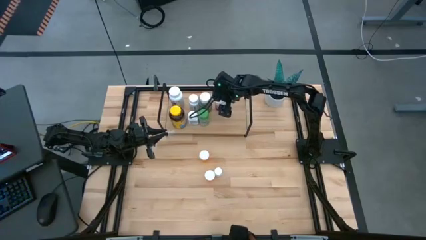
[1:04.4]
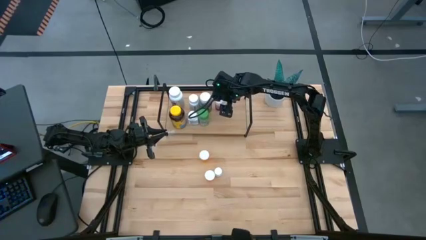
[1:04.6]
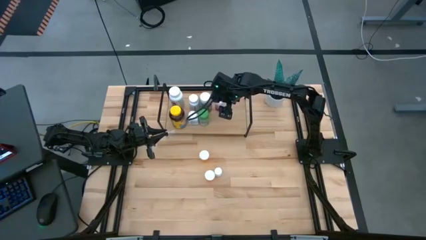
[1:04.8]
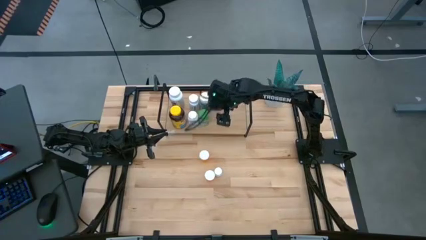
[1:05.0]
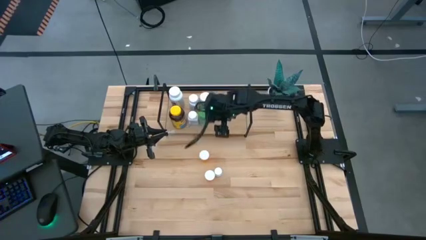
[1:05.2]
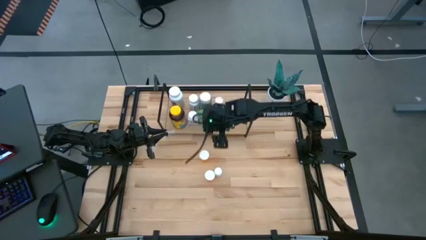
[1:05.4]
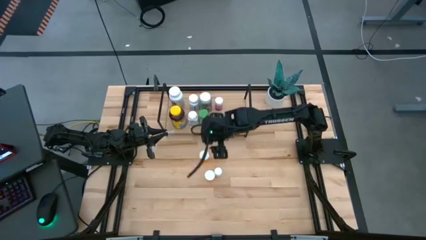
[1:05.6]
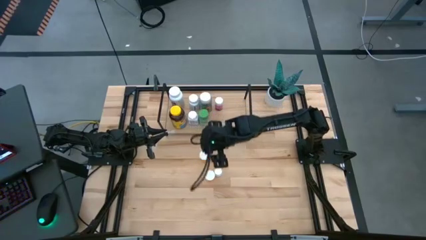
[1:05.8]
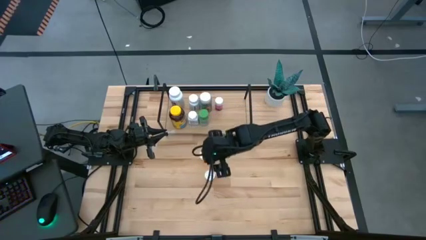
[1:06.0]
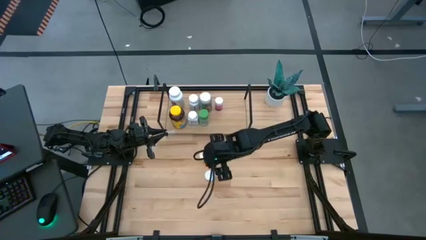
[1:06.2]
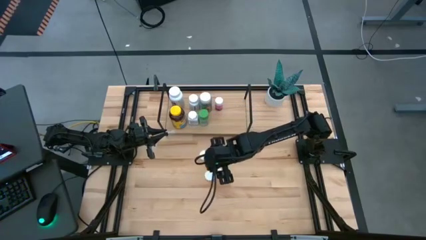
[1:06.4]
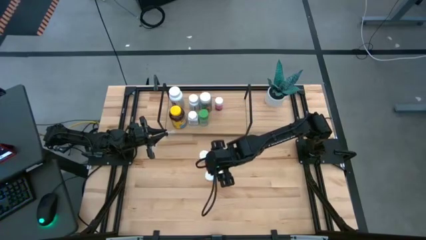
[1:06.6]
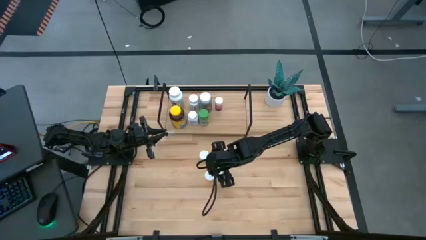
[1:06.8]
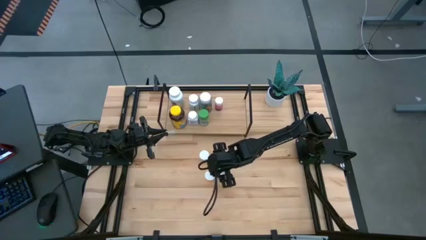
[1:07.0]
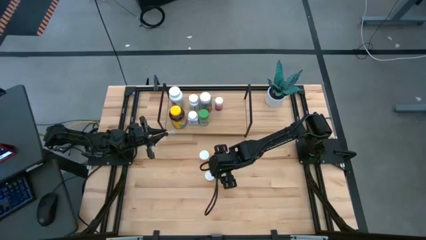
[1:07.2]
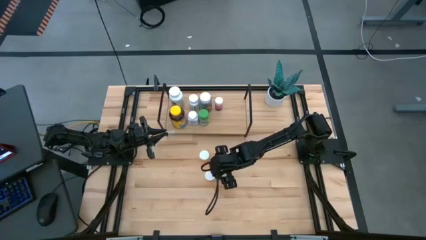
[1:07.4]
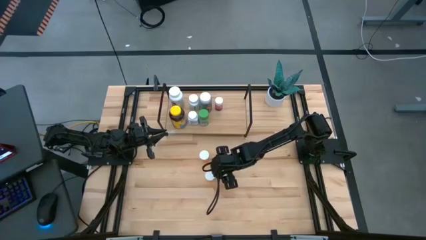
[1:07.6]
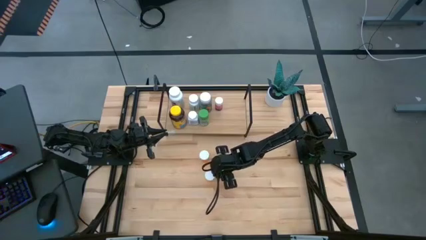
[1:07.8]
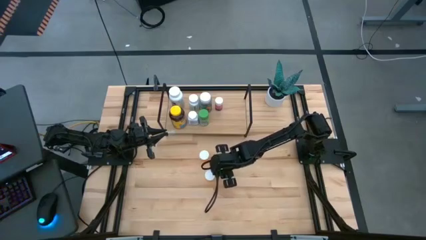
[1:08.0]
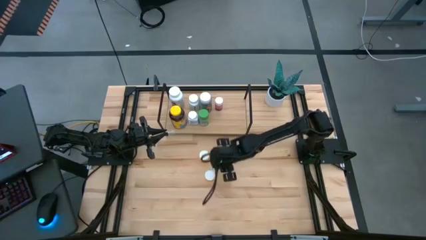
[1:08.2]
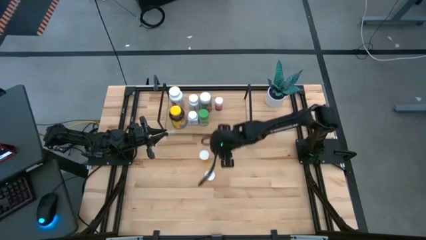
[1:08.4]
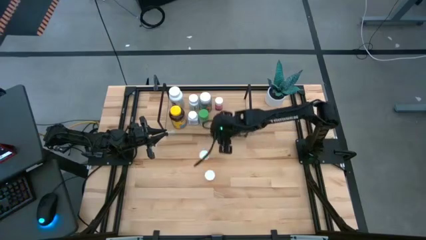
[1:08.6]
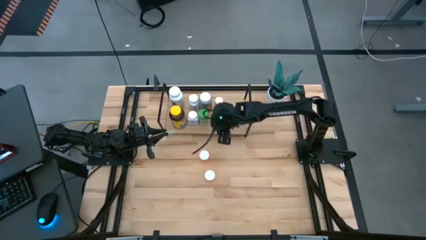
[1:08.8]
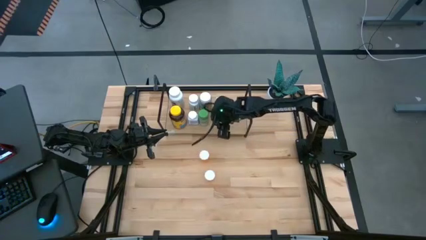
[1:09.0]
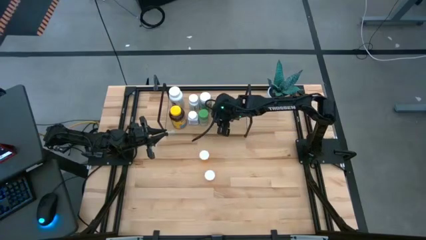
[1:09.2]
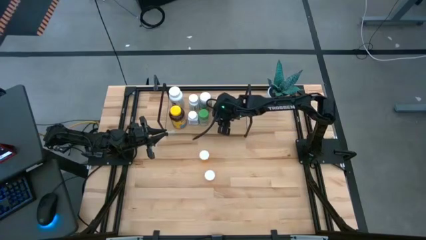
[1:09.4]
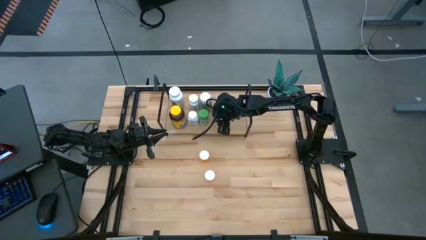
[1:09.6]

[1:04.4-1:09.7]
Task: Pick and place medicine bottles onto shelf by color
Put the white pill bottle on the shelf

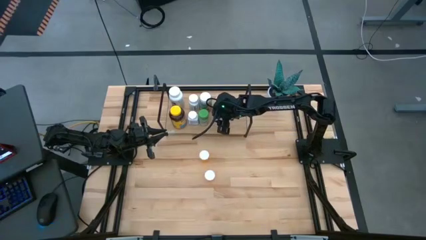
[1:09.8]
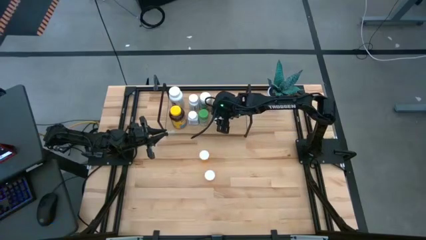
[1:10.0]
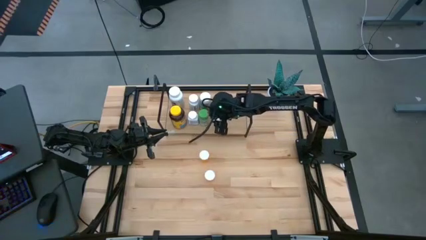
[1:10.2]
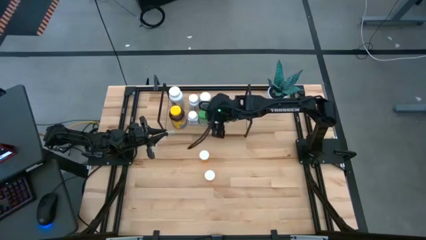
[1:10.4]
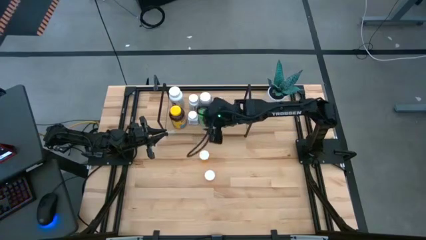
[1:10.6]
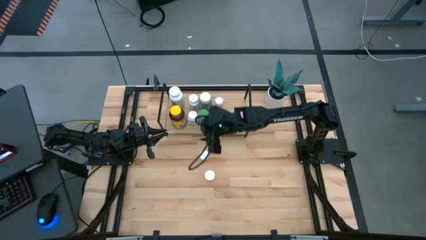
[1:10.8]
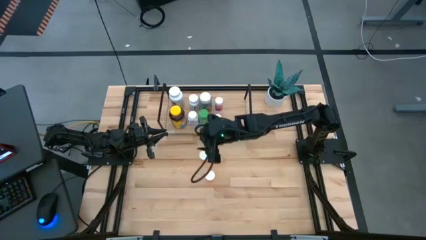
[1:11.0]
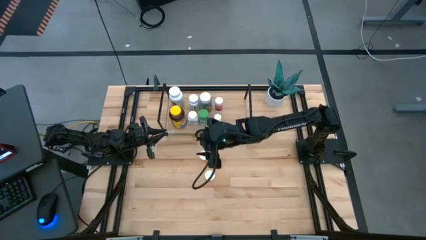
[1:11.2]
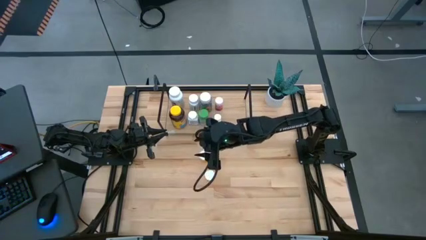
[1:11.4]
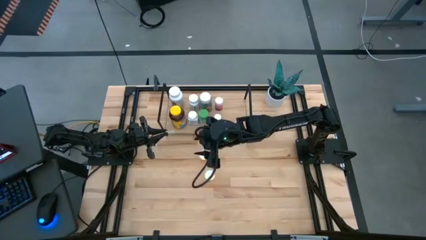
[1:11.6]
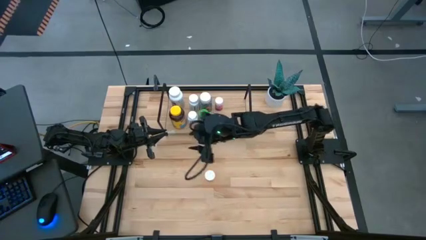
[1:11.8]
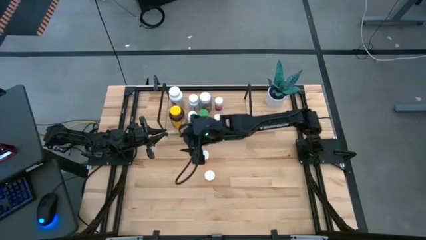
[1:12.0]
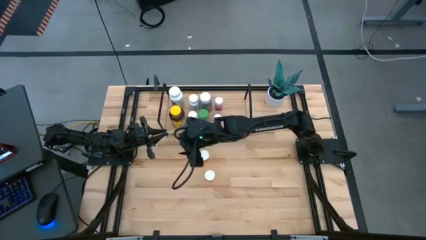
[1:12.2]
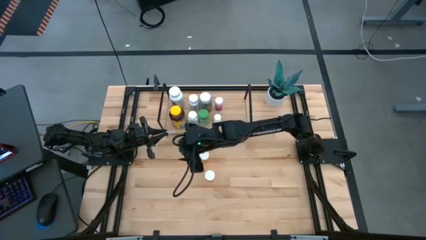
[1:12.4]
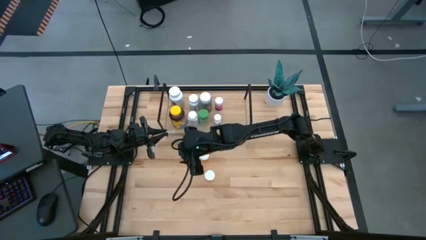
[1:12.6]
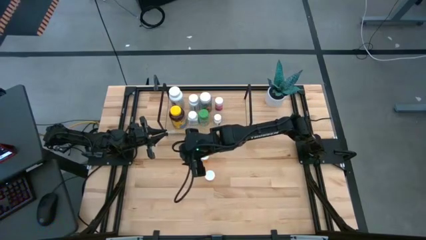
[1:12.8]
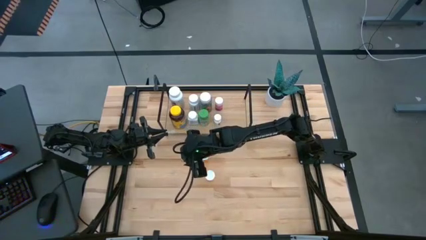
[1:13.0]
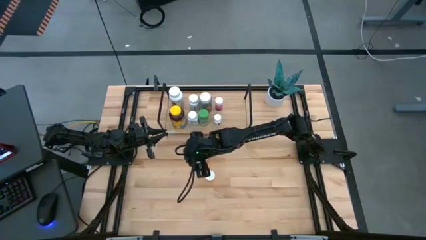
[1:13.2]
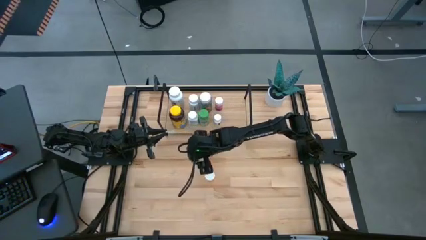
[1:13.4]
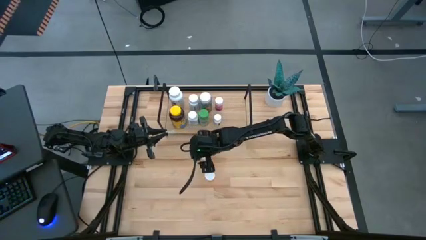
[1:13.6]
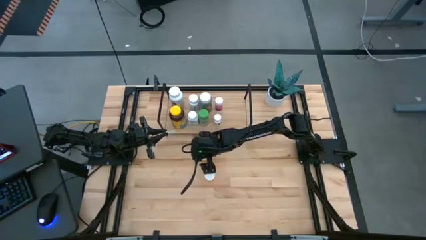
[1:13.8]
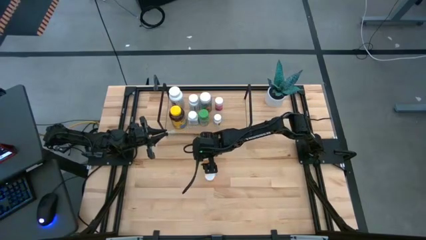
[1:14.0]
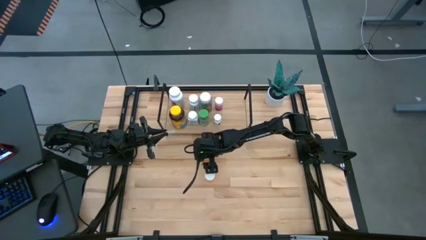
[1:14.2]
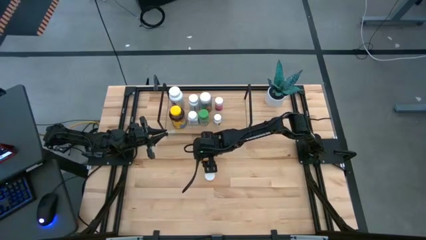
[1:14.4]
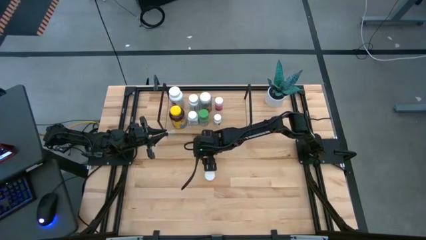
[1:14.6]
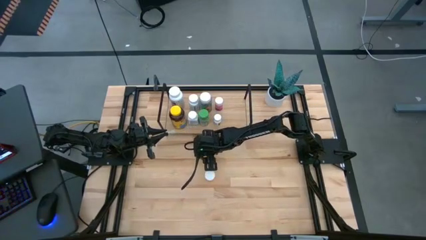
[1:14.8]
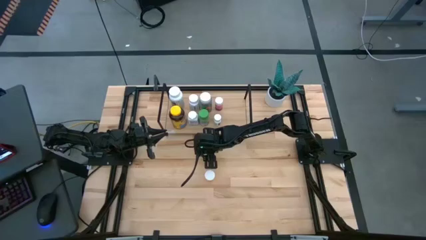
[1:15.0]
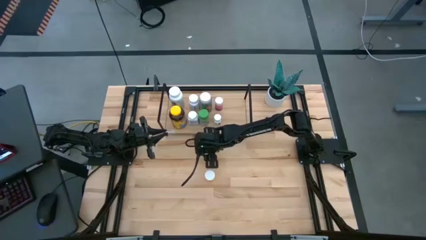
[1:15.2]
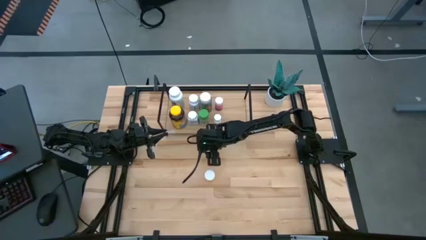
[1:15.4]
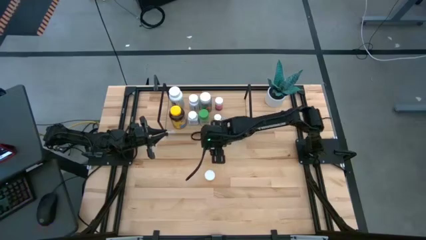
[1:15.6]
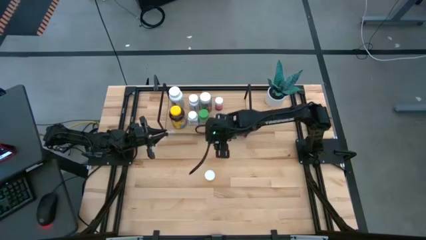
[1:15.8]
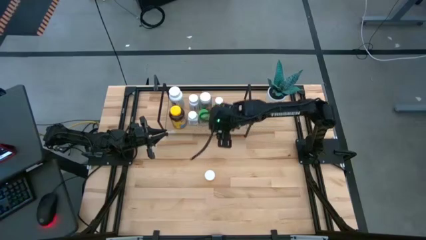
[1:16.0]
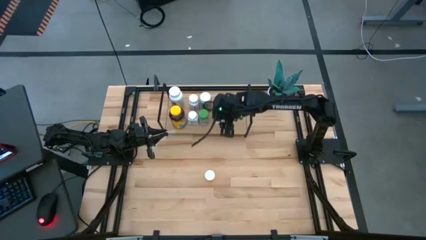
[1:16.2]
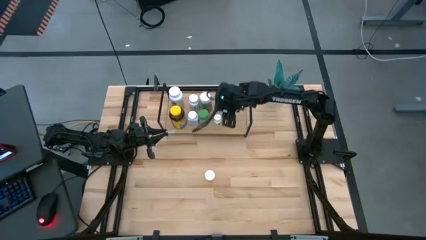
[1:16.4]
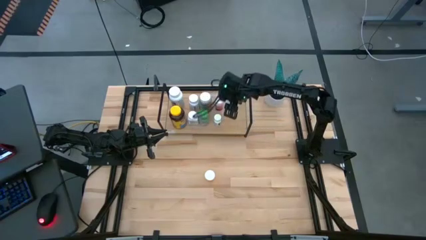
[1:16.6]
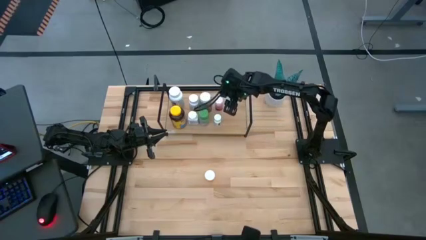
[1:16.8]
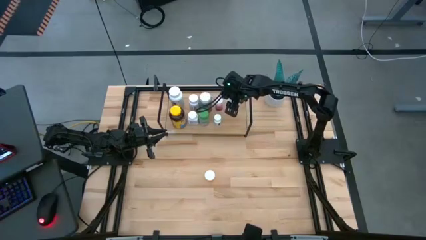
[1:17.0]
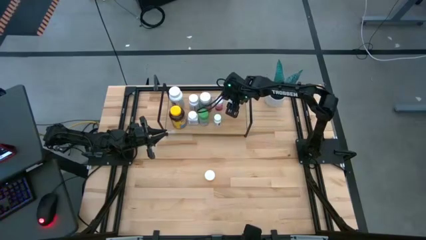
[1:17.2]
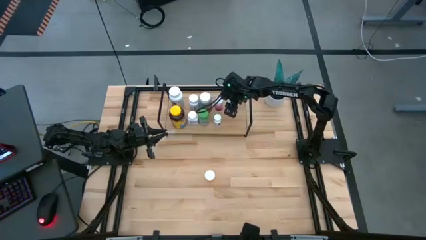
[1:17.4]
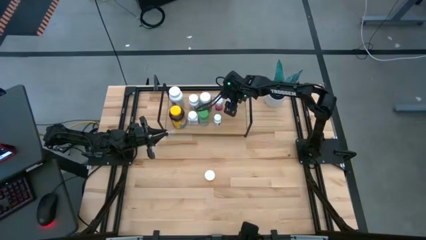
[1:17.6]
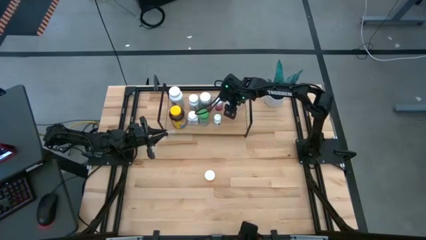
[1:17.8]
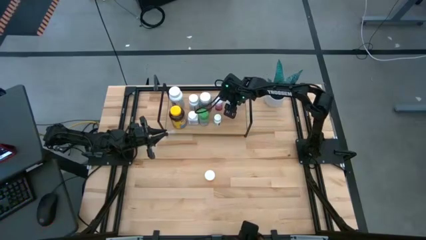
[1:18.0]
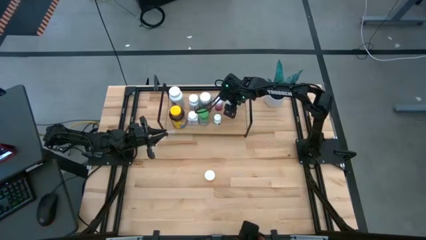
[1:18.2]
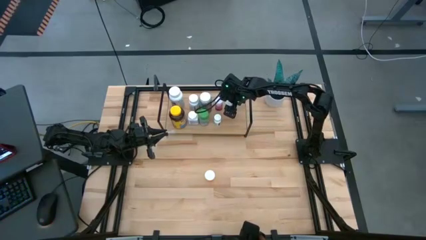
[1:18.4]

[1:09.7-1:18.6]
Put the top orange pill bottle on the shelf

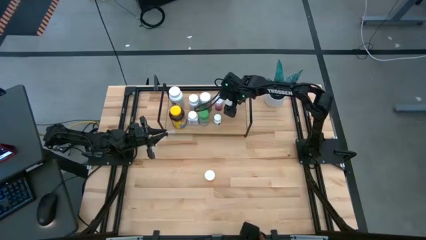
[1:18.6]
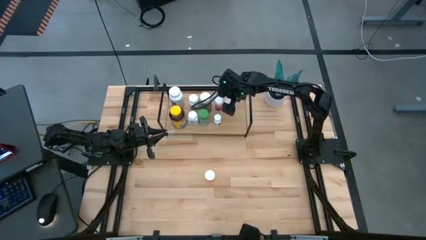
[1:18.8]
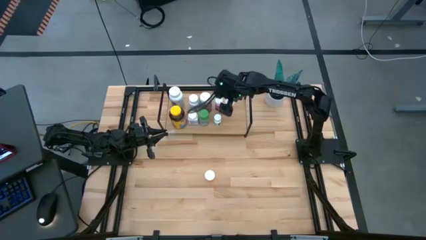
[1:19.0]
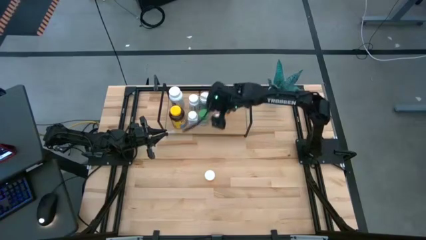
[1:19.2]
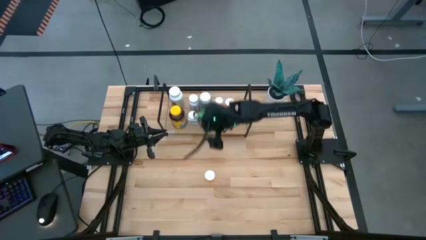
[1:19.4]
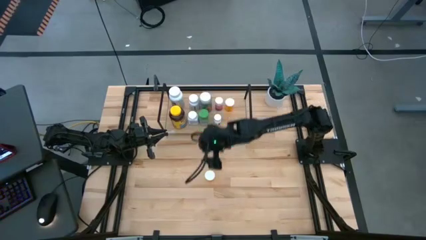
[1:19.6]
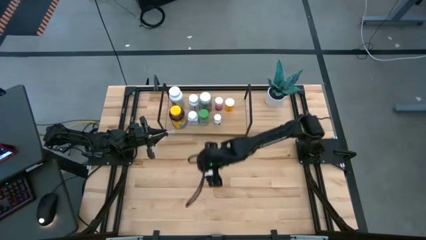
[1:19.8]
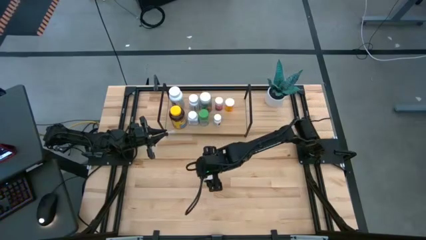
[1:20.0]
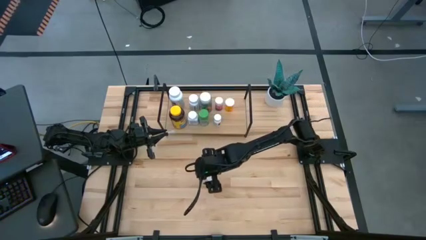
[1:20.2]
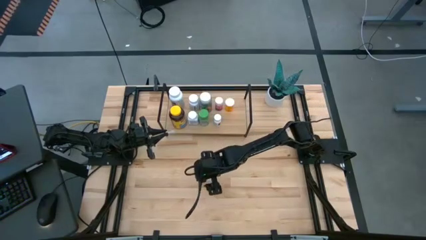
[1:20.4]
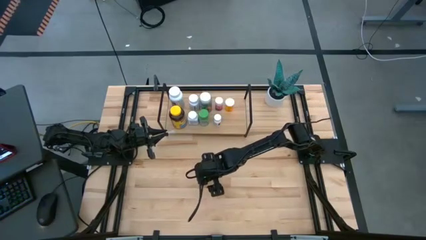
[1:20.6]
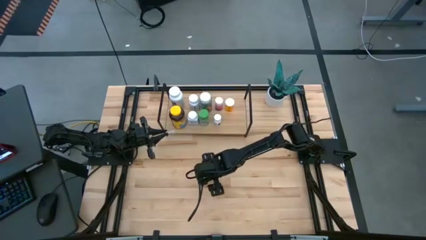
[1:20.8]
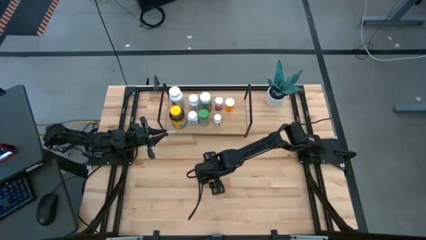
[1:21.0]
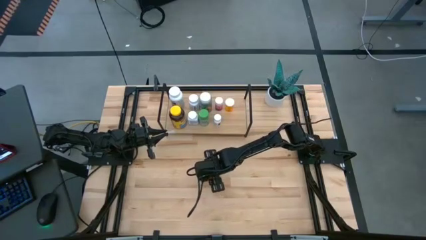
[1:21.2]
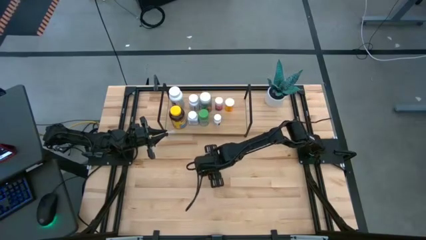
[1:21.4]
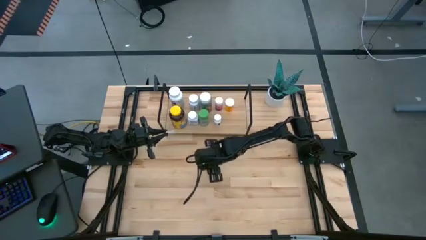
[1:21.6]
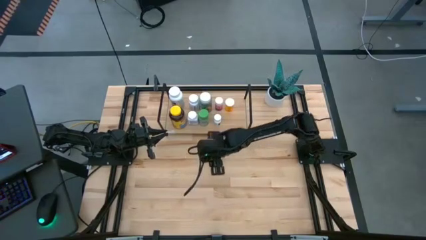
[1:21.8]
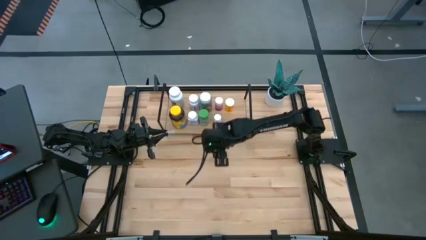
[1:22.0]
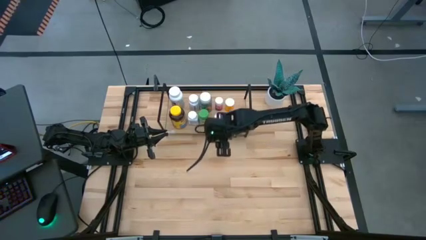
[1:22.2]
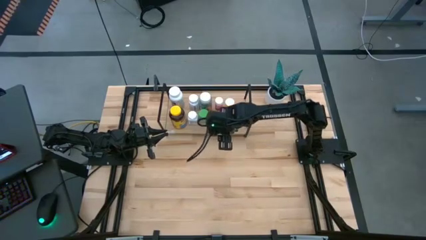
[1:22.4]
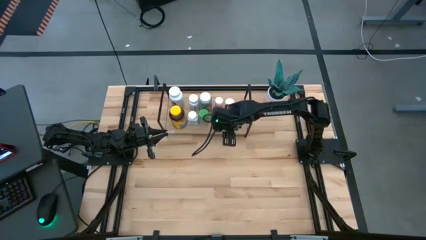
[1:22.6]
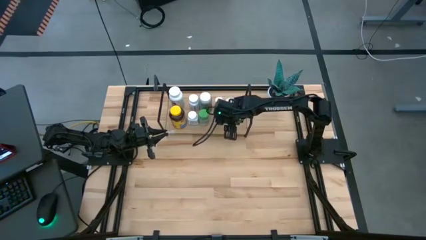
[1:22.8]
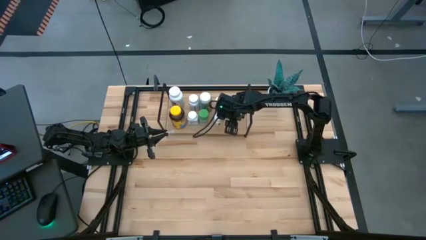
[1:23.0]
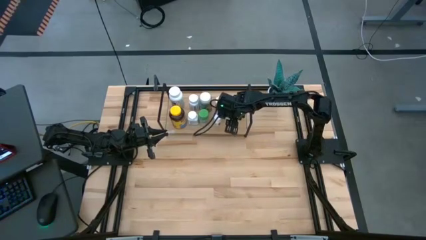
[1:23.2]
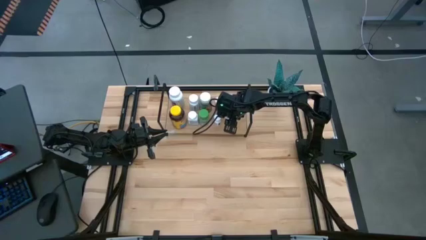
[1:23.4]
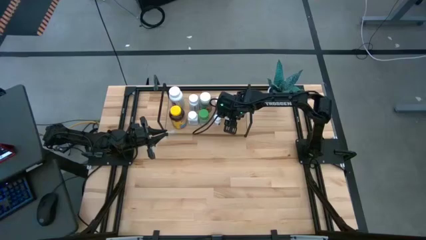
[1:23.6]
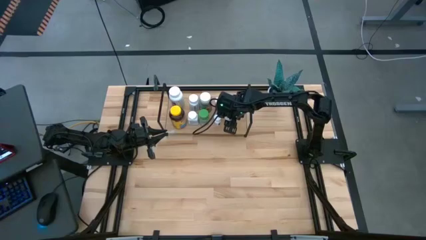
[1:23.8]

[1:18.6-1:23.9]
Put the orange pill bottle on the shelf
